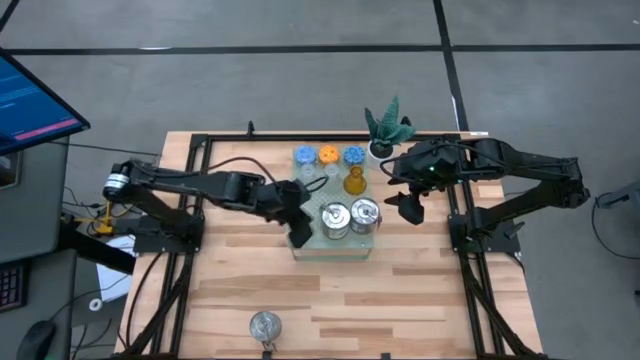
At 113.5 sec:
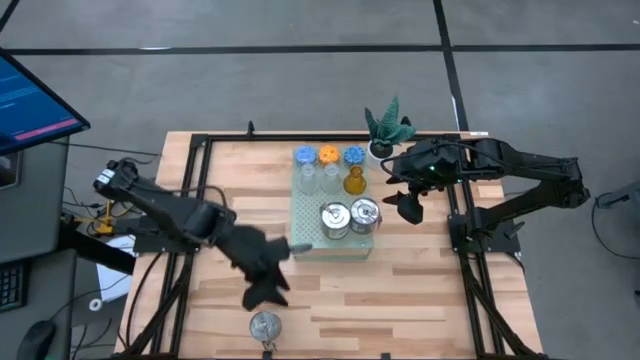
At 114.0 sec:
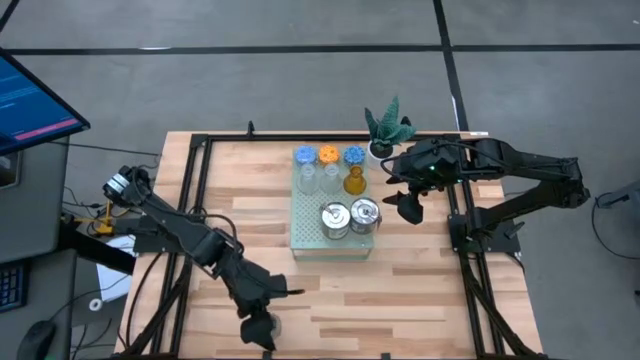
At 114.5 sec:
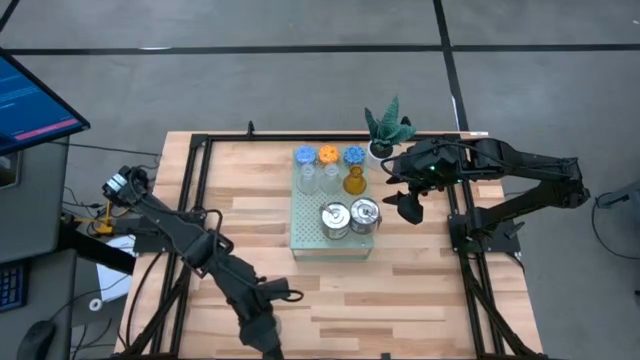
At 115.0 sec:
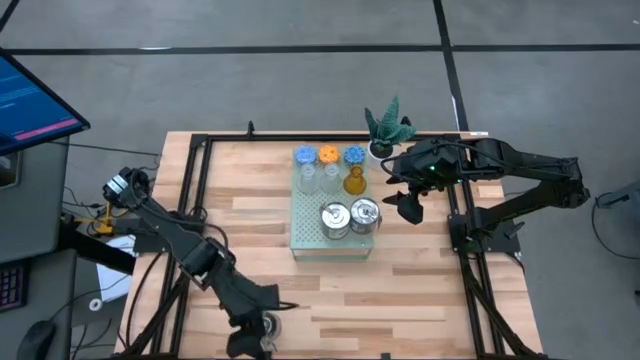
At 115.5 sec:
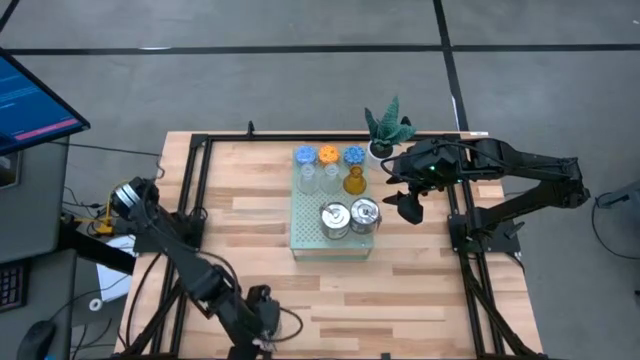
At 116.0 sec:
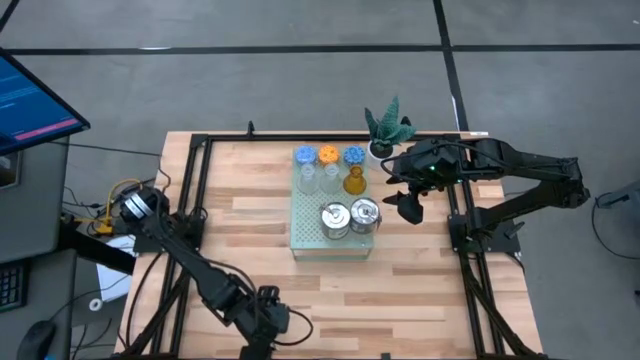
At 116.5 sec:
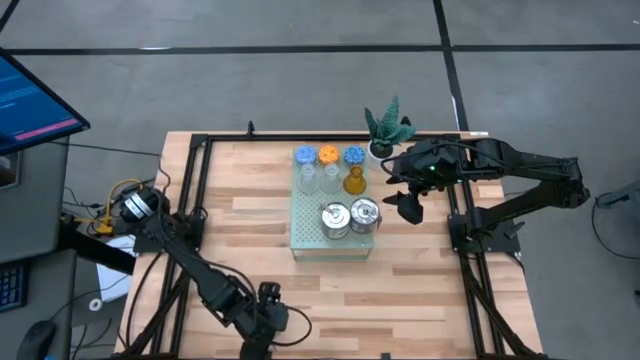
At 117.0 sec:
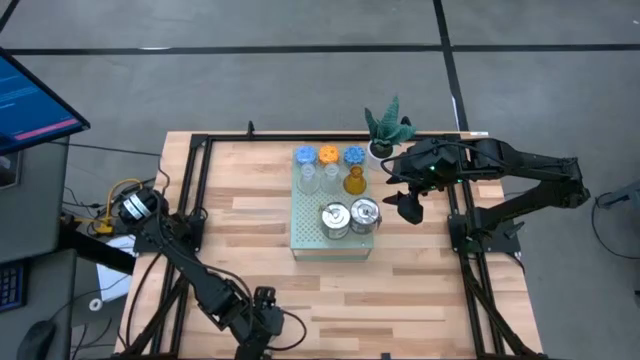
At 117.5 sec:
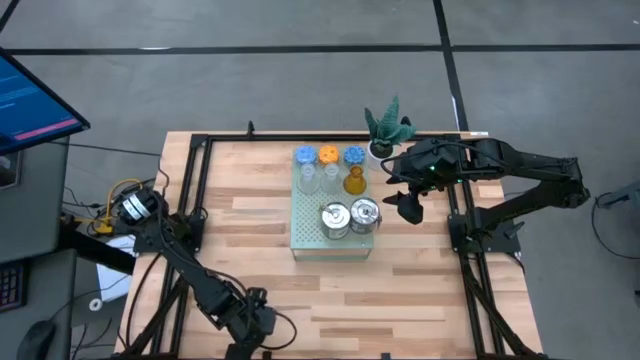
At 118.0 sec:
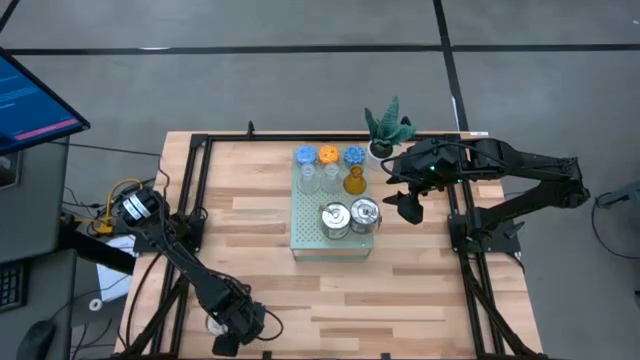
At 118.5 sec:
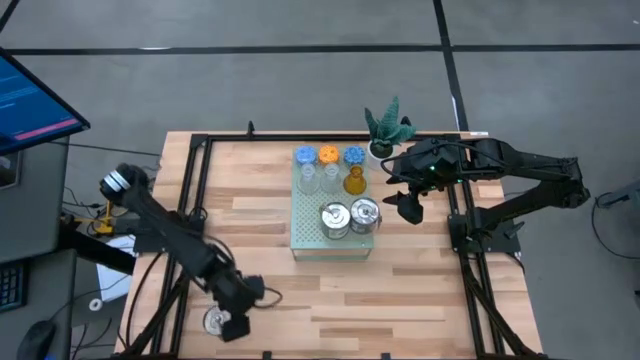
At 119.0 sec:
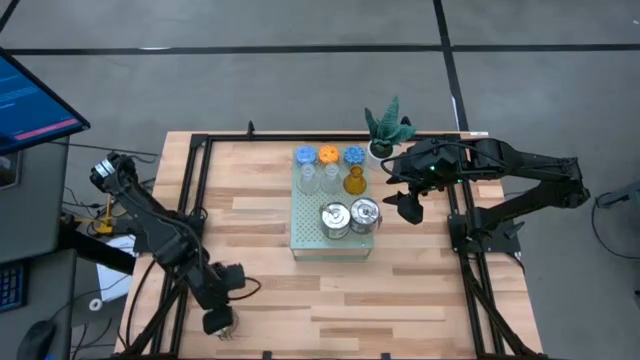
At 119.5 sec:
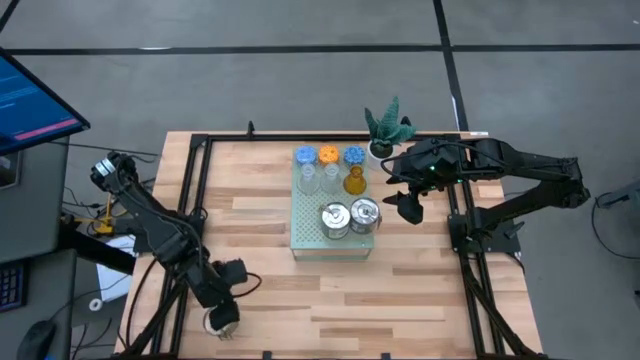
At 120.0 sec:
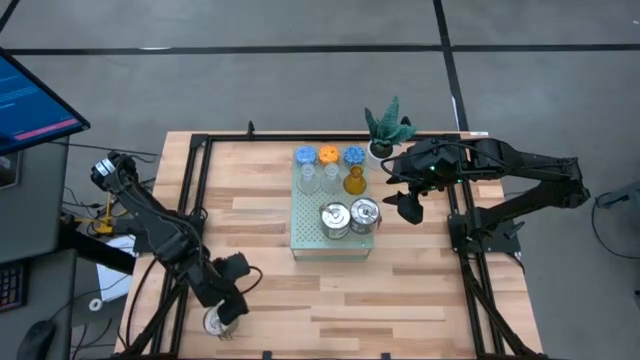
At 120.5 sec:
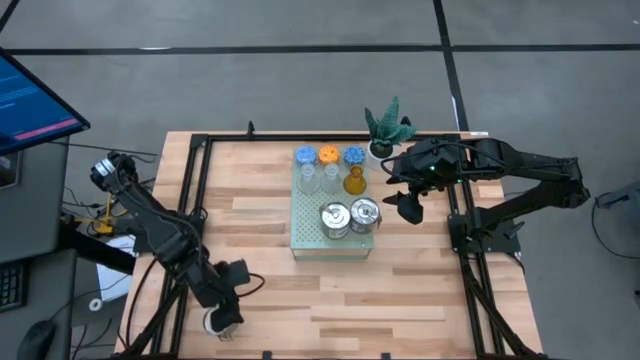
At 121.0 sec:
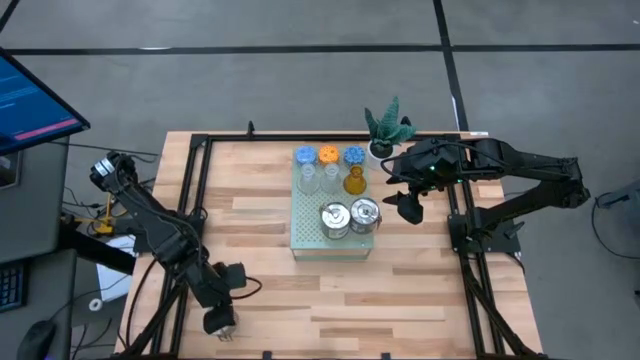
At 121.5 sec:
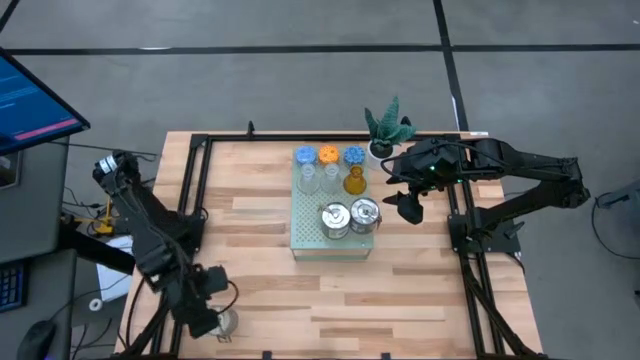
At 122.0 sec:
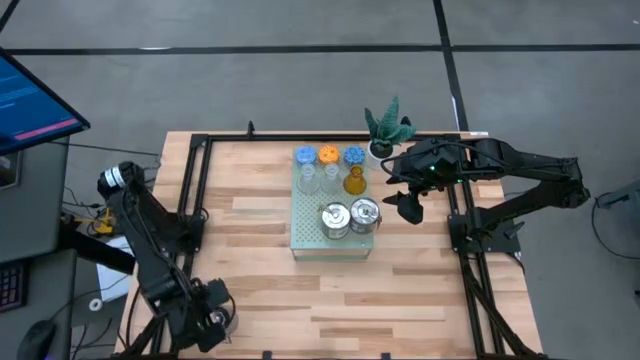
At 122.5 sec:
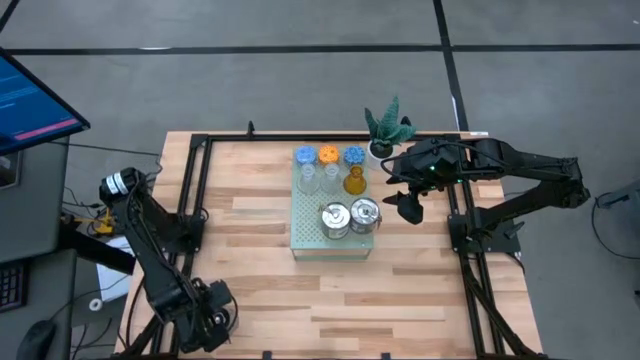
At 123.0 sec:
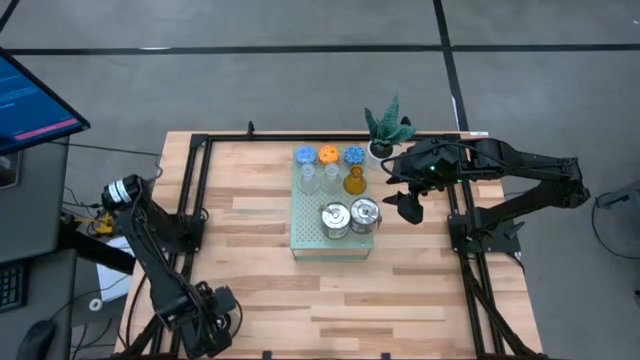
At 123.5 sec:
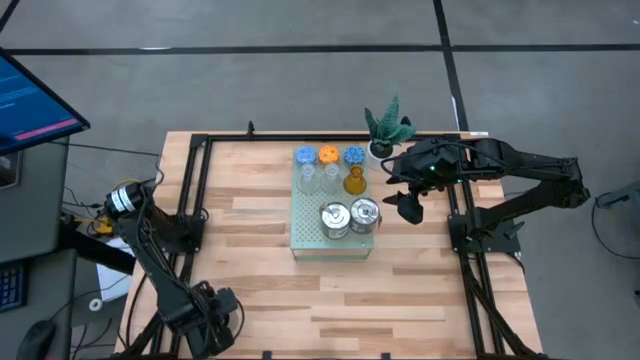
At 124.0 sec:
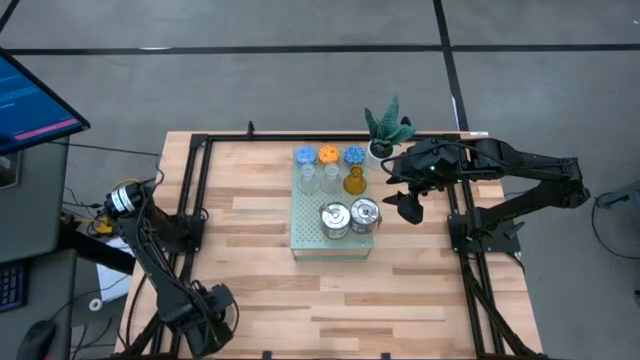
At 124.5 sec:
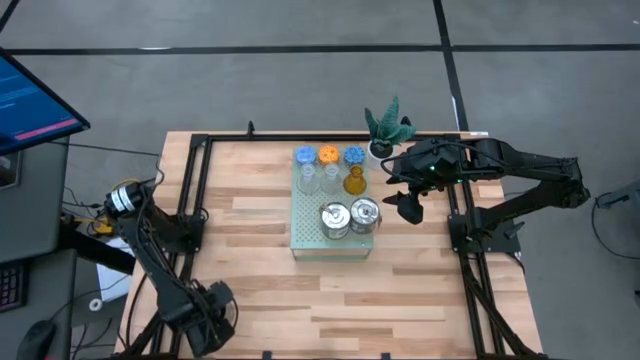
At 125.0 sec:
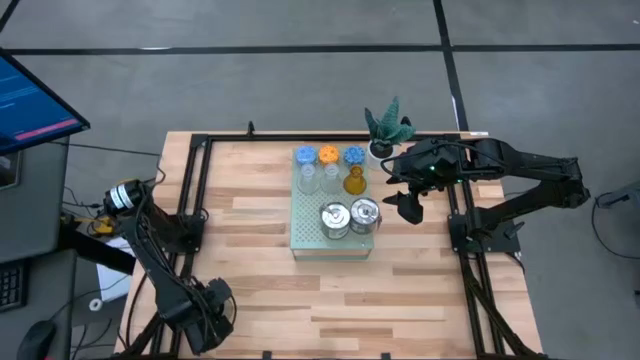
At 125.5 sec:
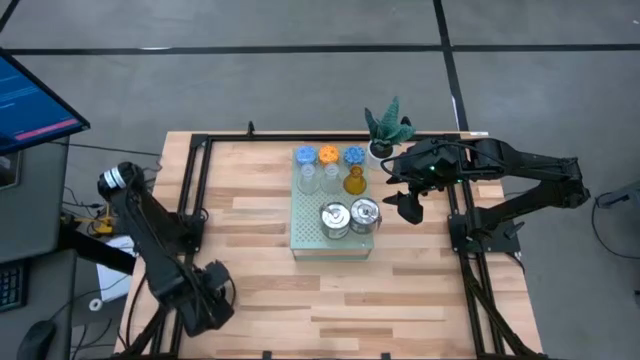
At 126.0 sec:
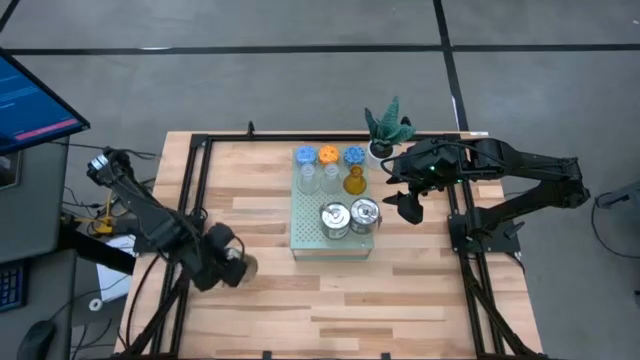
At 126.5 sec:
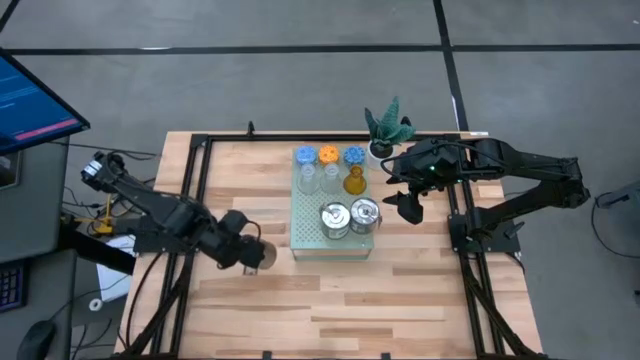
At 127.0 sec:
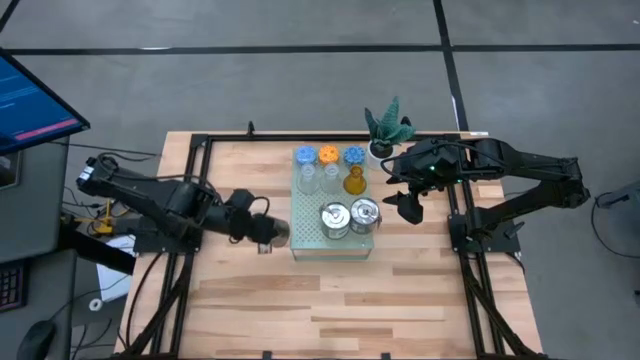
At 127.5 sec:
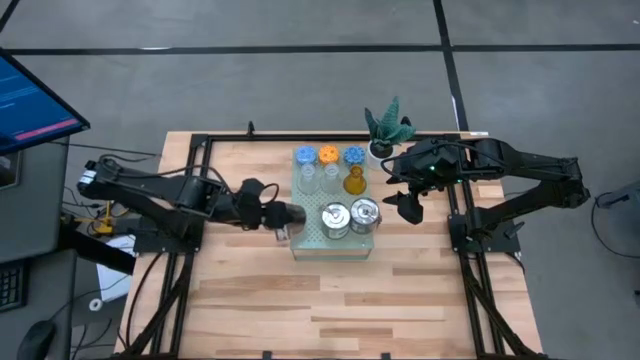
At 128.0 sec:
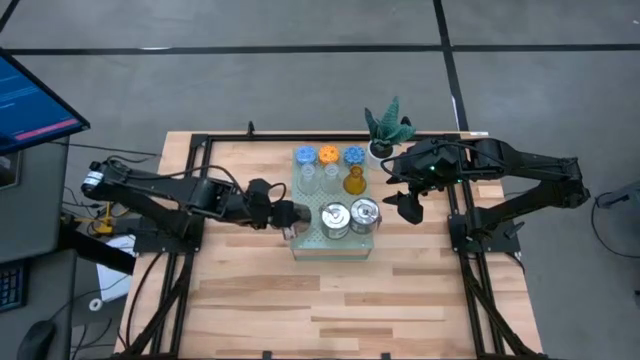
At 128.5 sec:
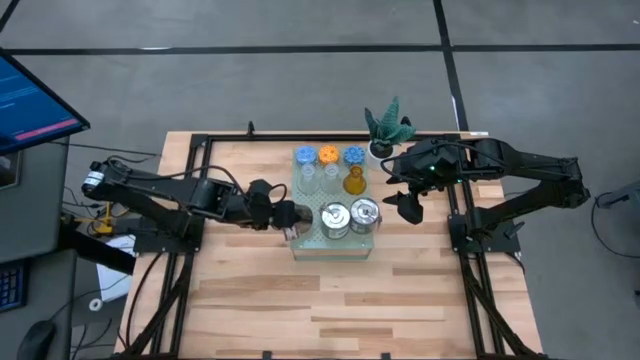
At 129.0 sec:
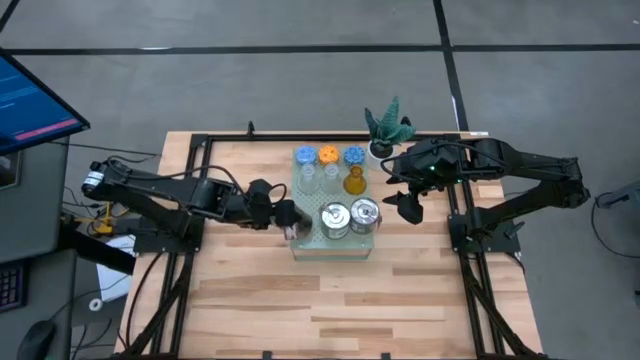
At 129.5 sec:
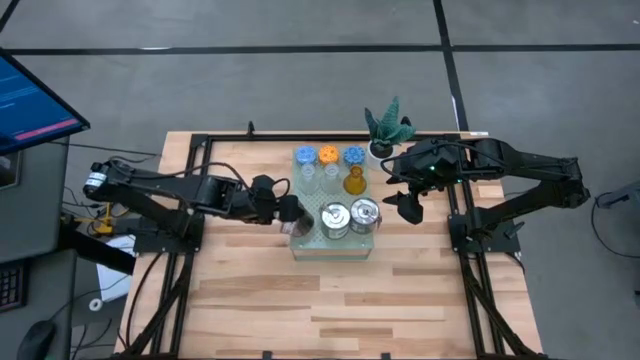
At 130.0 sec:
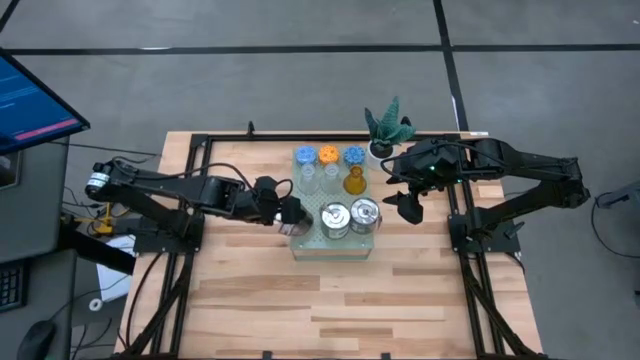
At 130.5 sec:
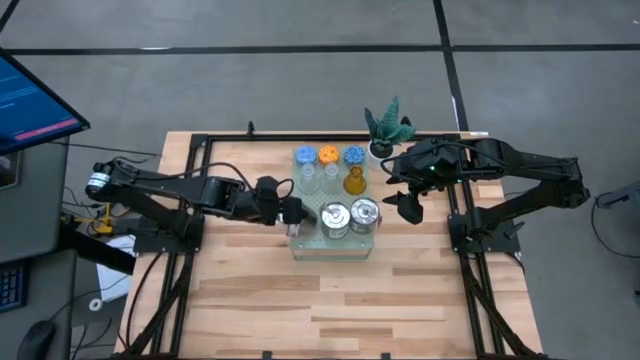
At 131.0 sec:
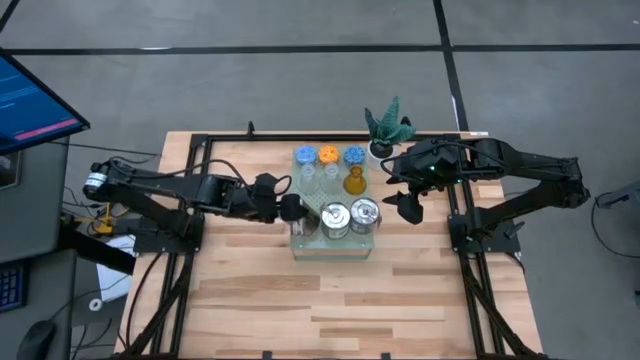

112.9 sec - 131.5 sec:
Task: Stock candles and holders on shelf
Put the silver scented candle can on the shelf aligned with the other silver scented candles

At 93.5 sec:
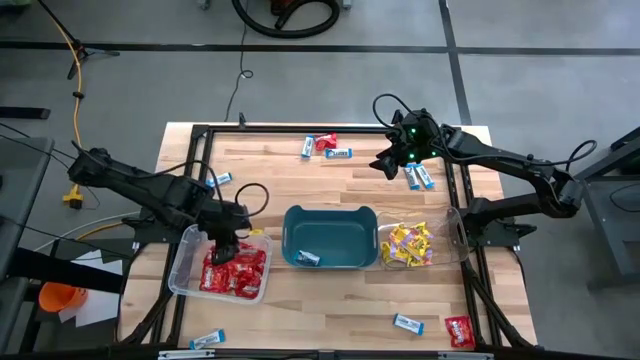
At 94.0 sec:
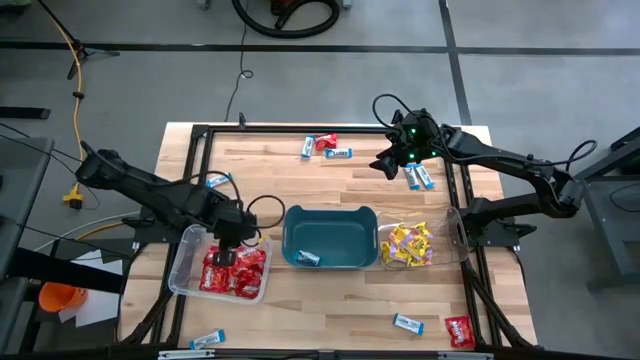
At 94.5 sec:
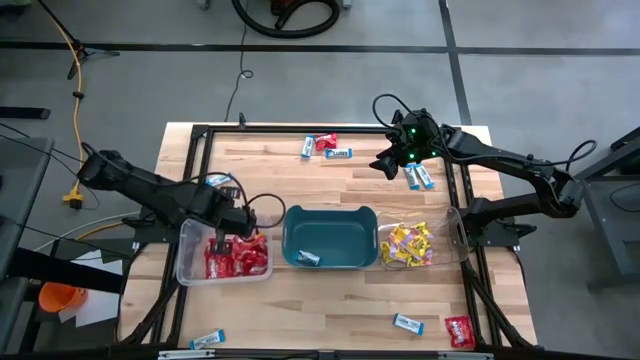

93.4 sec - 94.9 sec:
Task: Sort candy
Adjust the left transparent bin
